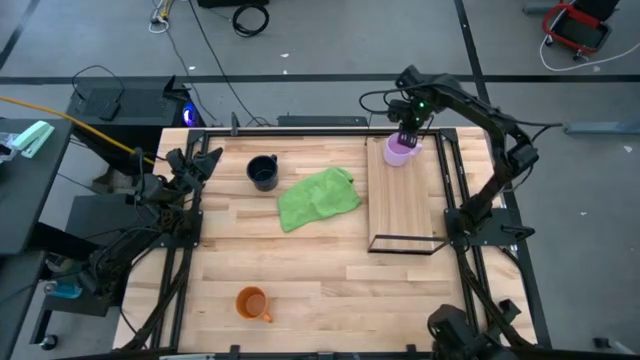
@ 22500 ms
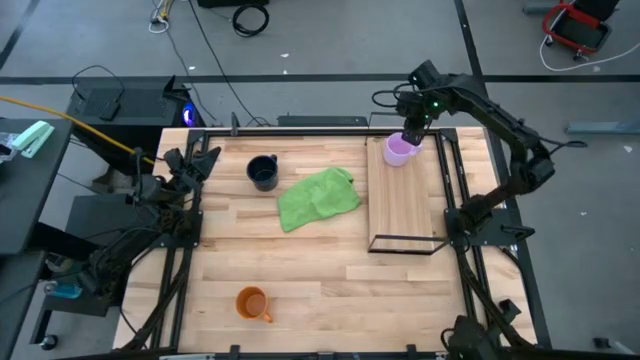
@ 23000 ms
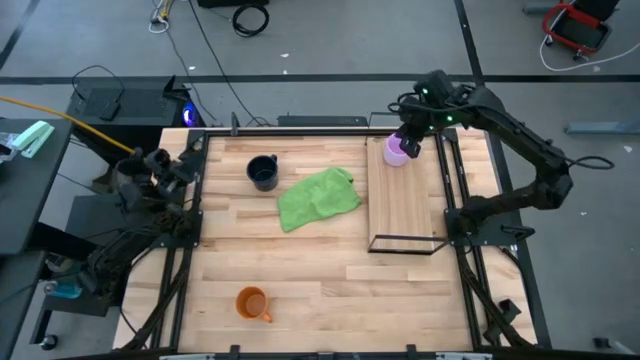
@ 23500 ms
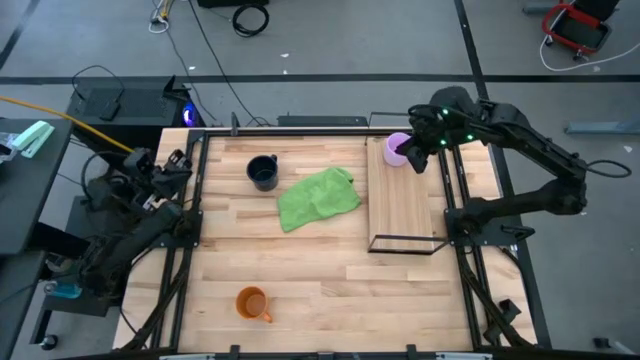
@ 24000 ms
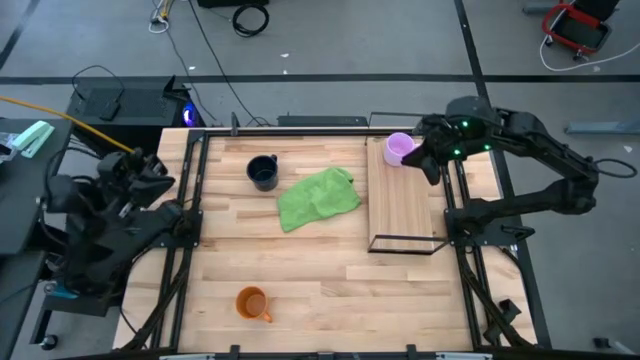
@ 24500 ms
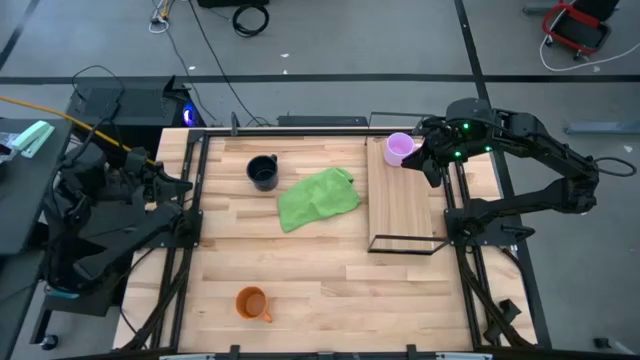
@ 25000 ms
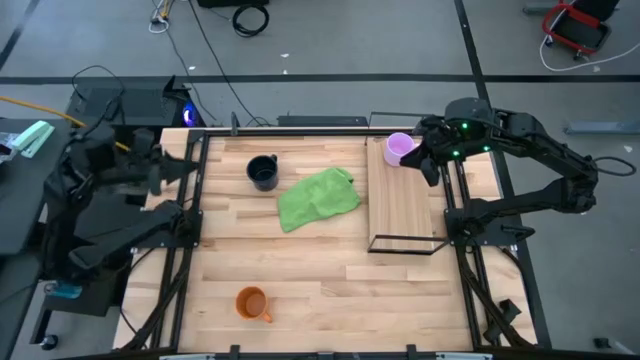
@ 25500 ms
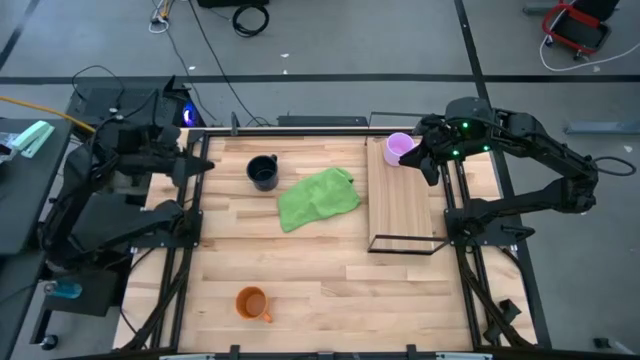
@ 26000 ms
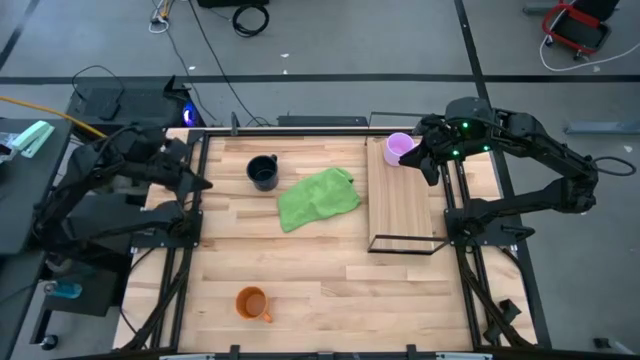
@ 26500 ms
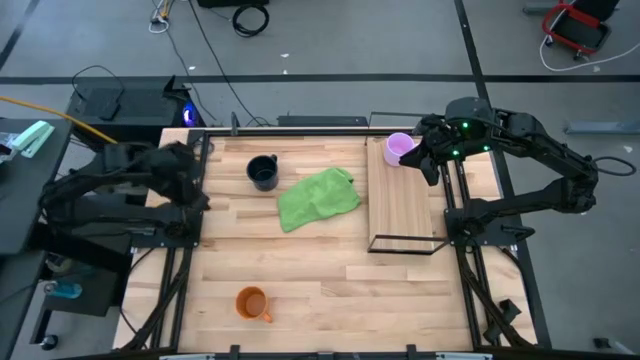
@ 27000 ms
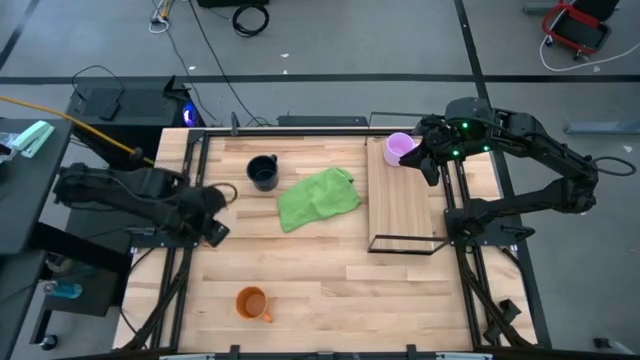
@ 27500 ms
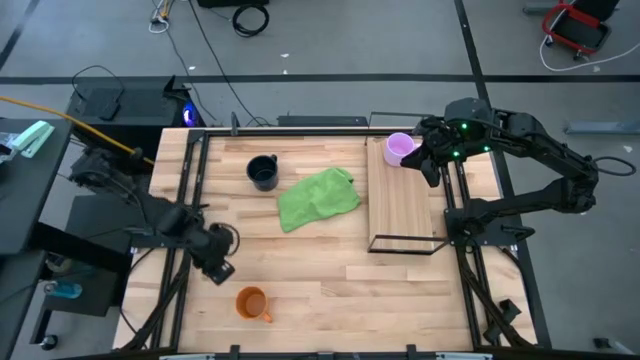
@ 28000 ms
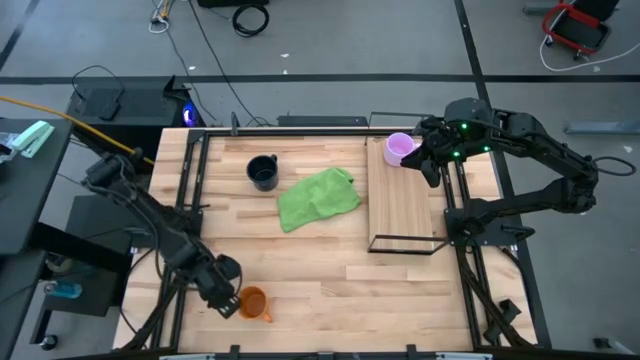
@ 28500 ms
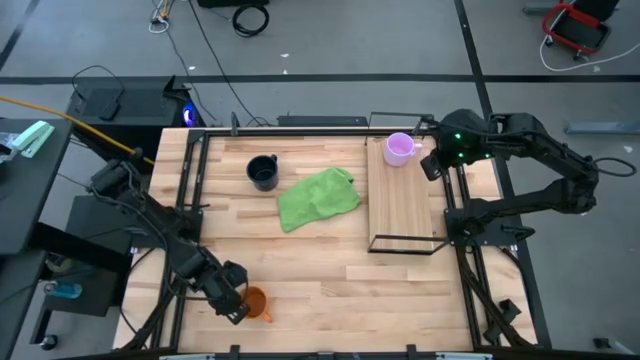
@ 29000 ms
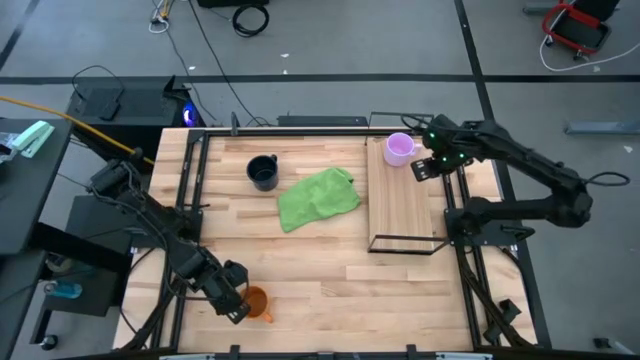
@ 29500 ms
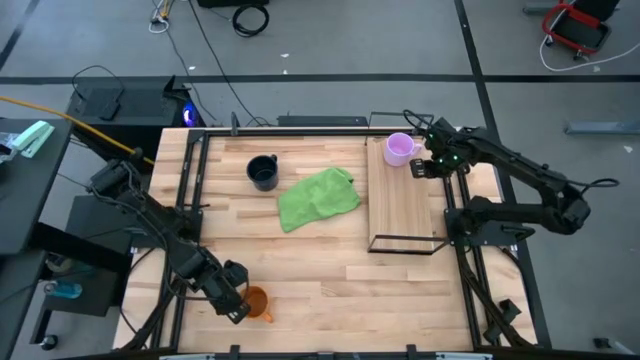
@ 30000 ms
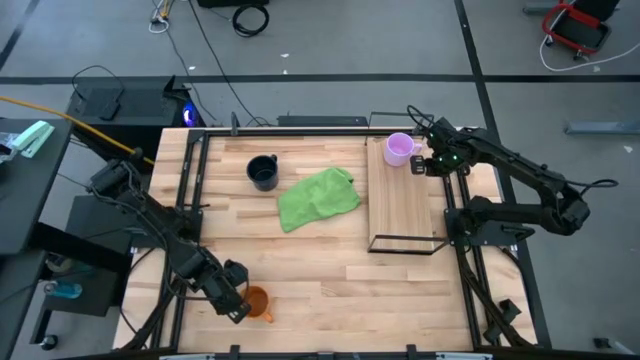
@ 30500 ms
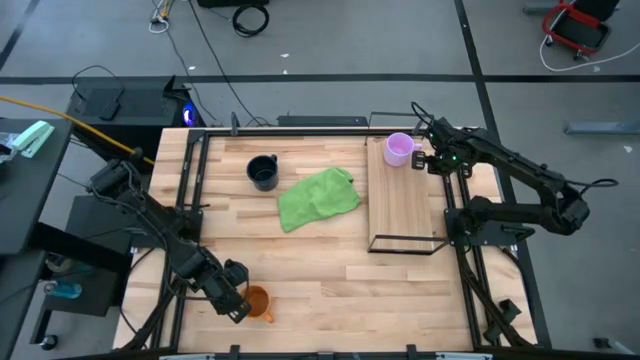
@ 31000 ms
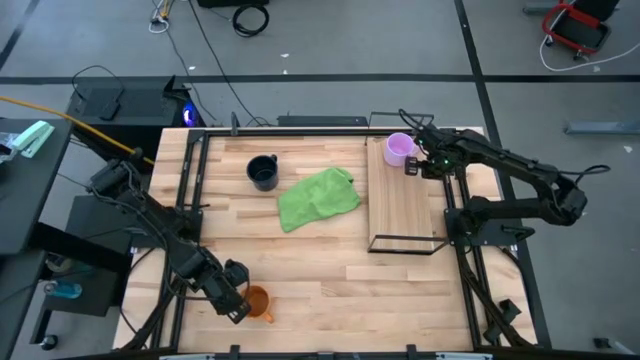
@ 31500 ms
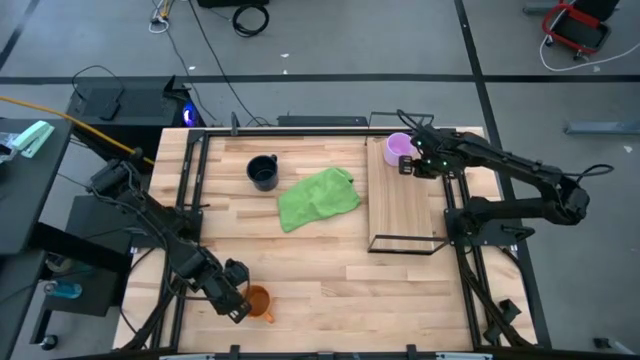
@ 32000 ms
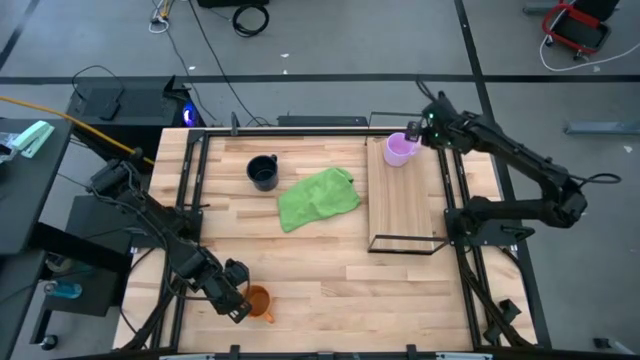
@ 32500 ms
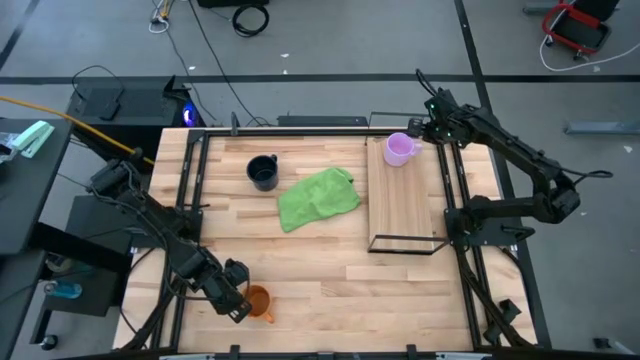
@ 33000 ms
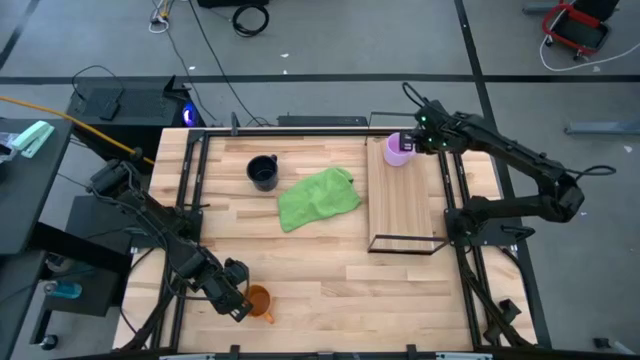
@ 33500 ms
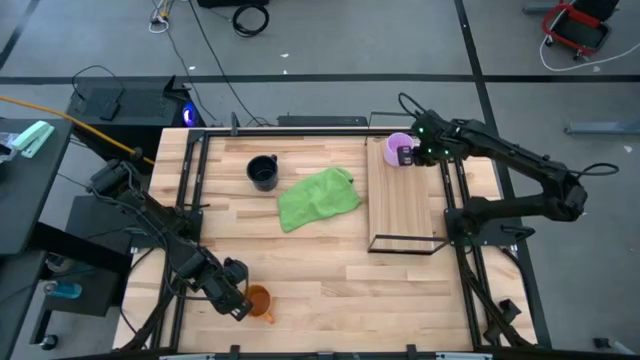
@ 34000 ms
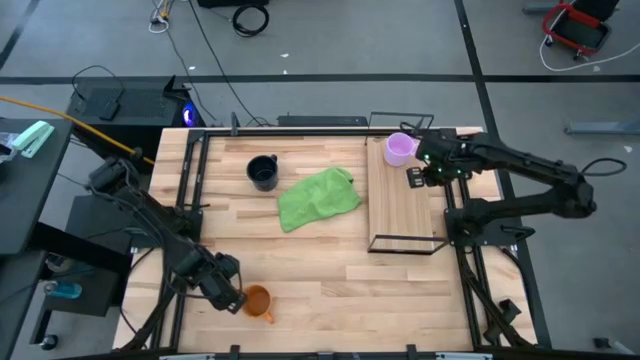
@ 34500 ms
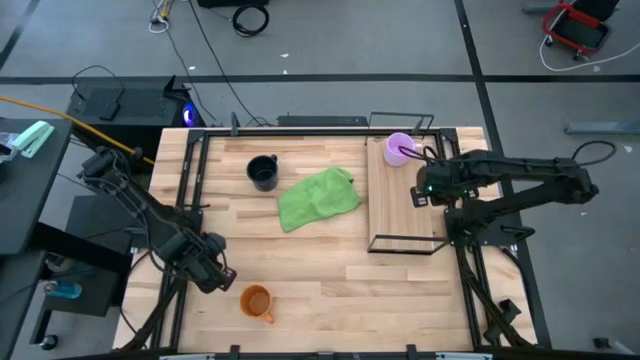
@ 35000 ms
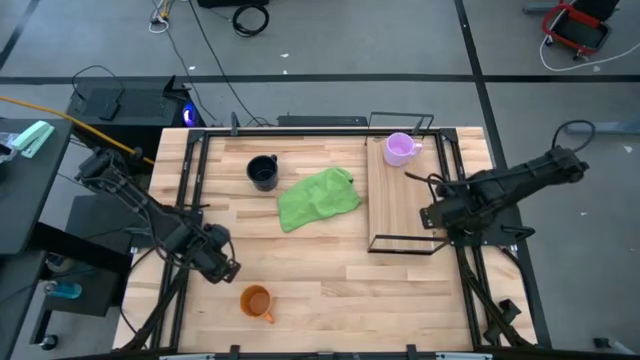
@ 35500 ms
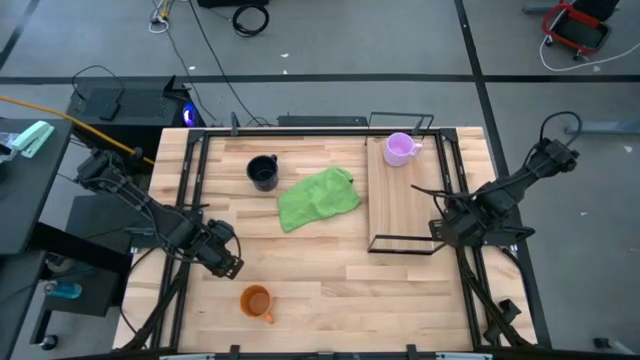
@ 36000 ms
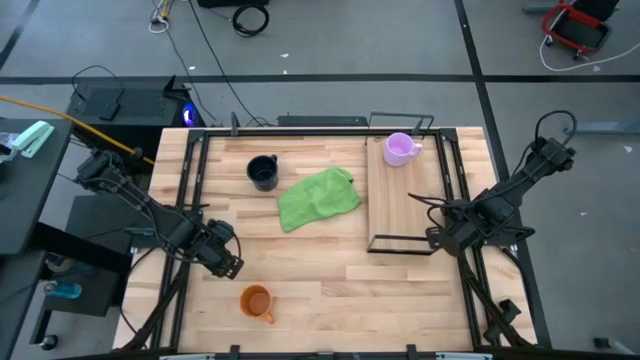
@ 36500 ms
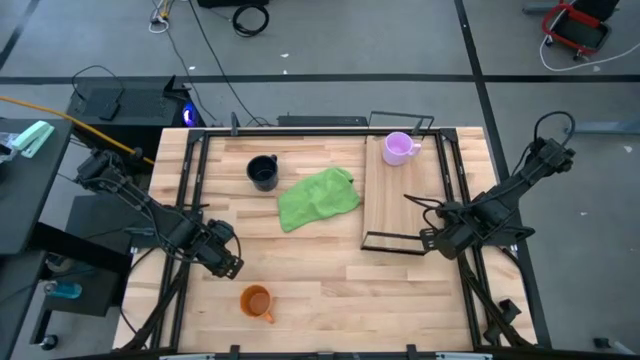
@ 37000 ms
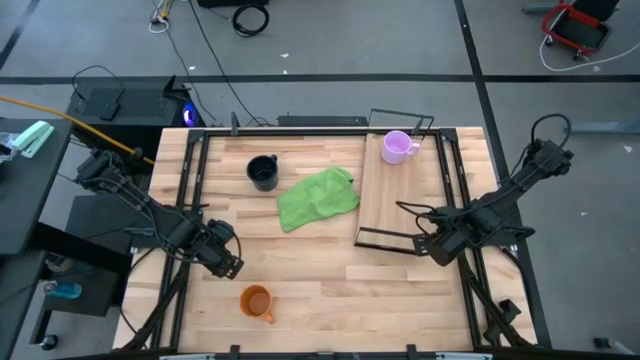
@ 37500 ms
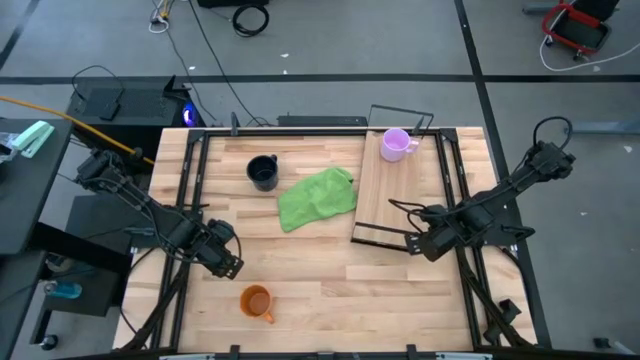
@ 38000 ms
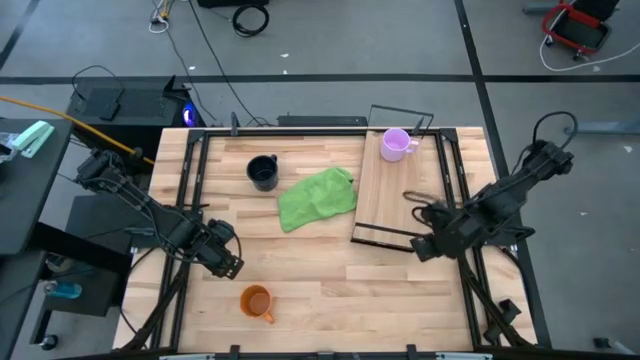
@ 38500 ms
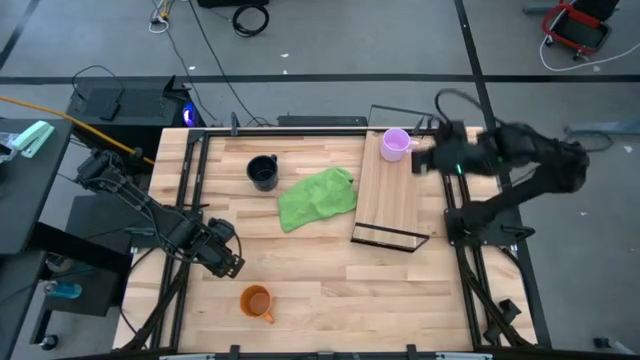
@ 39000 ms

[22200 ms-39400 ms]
Task: Stack small to large cups/mugs on shelf
Move the shelf to the center

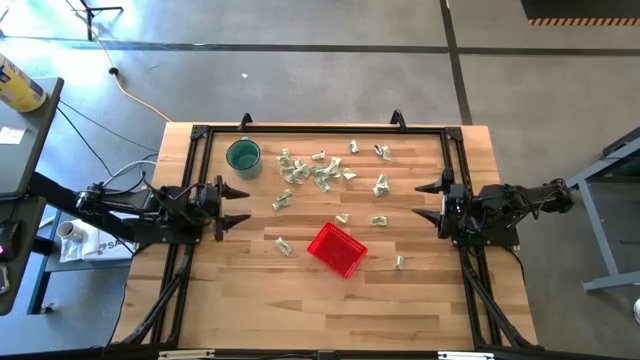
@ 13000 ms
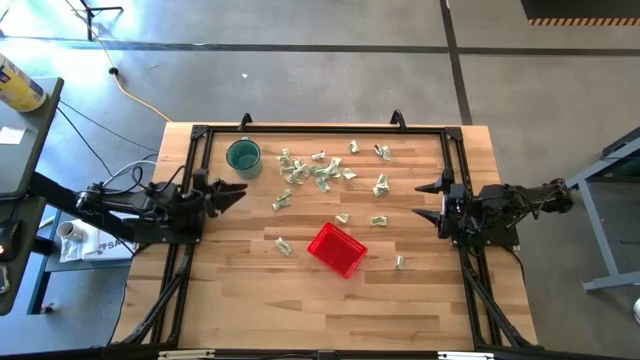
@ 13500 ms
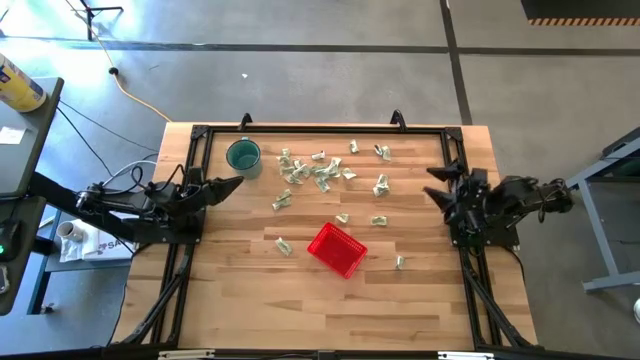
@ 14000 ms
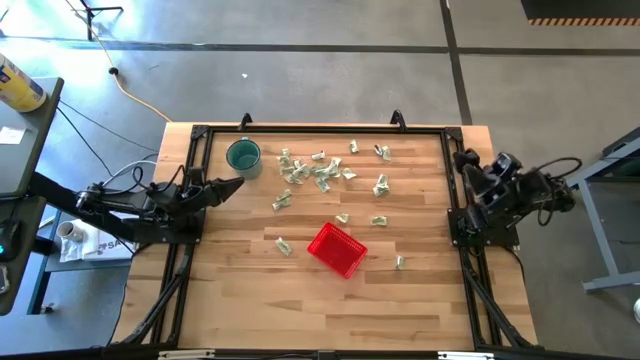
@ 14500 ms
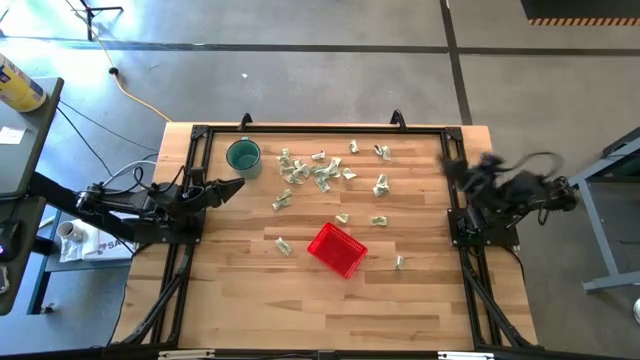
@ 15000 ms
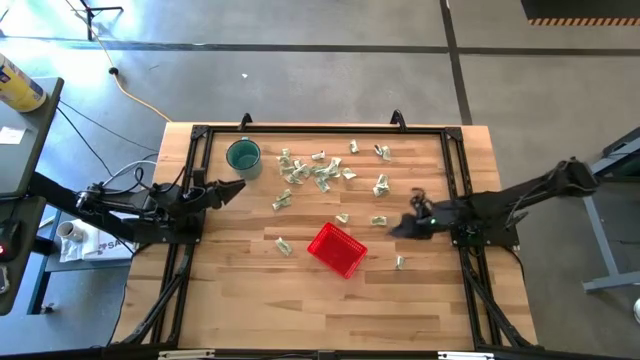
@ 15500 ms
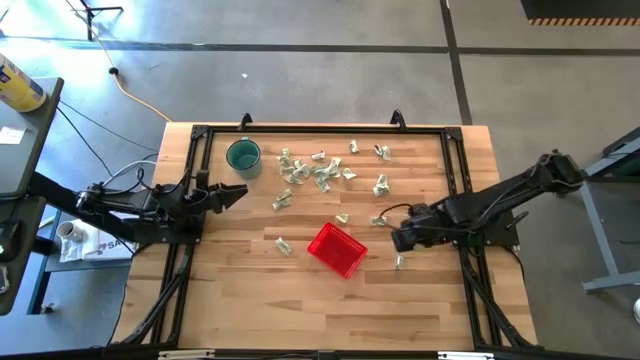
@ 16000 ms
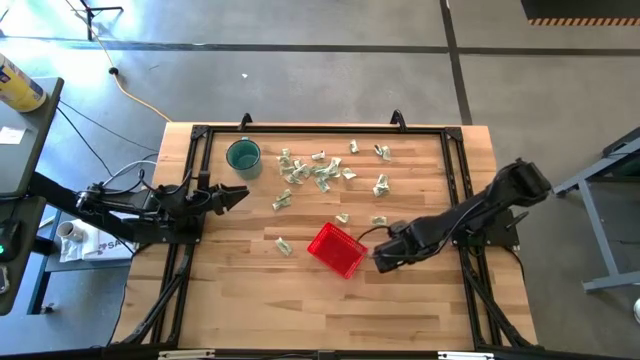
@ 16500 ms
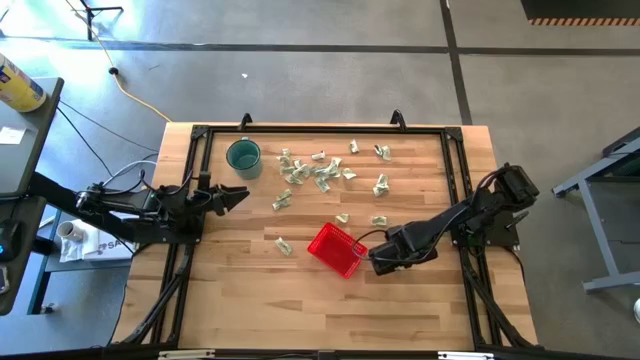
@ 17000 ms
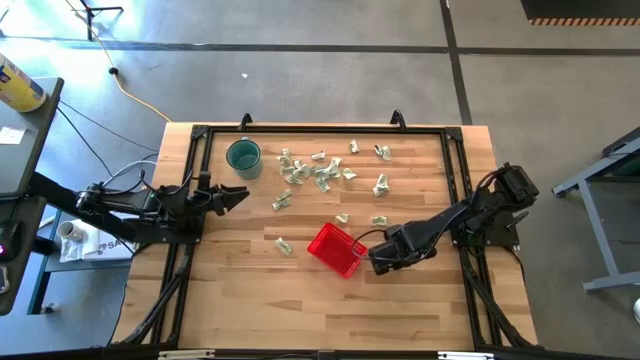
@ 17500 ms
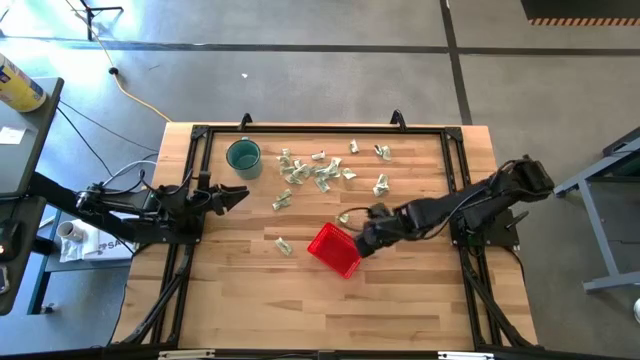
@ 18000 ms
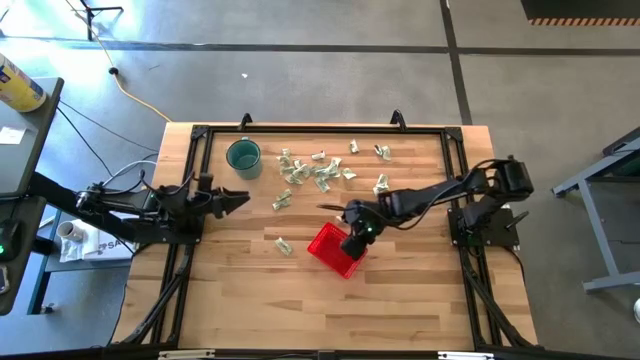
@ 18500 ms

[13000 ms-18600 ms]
Task: Pick and place Stevia / Truvia into bins
Put the light green stevia packet into the bin
